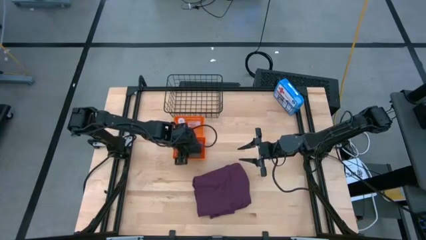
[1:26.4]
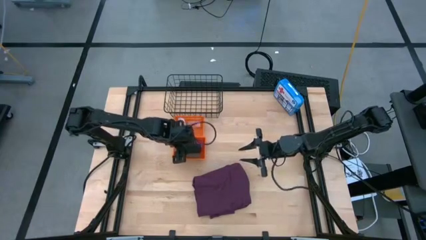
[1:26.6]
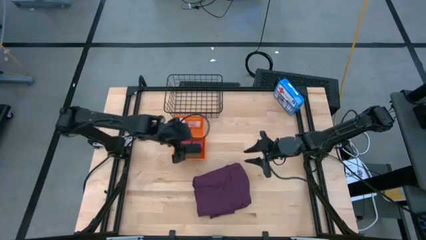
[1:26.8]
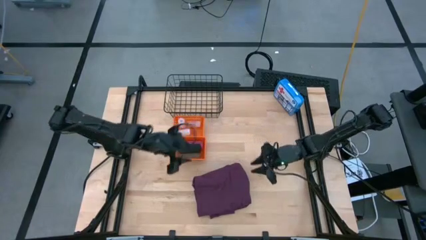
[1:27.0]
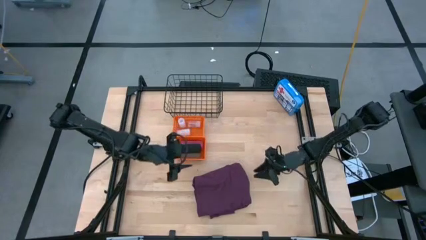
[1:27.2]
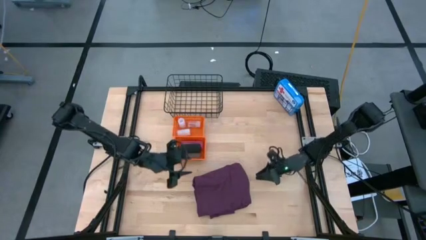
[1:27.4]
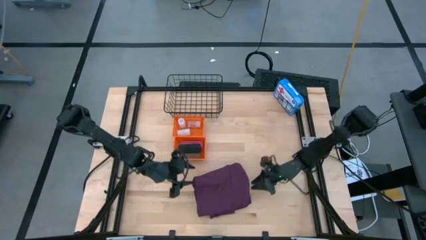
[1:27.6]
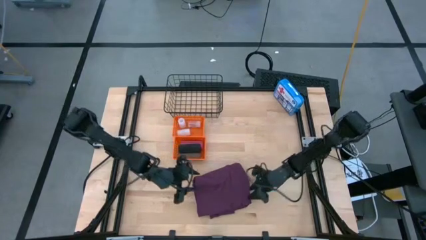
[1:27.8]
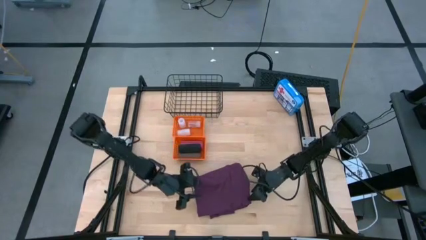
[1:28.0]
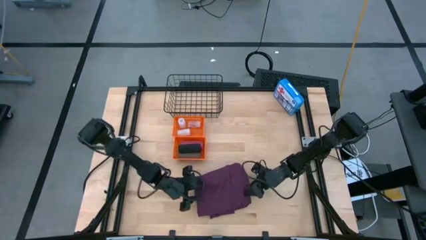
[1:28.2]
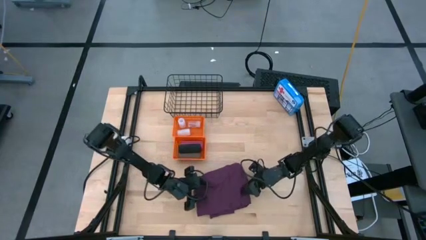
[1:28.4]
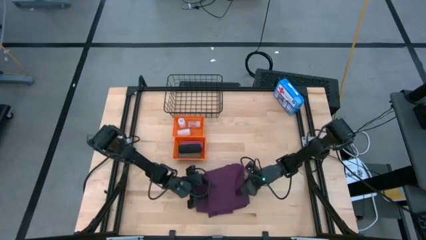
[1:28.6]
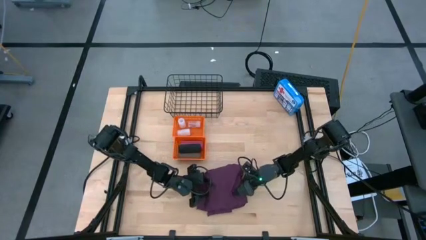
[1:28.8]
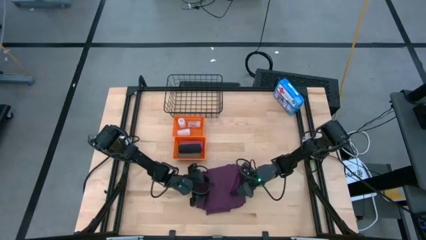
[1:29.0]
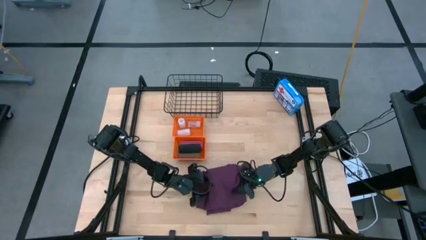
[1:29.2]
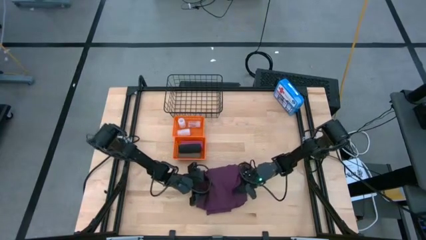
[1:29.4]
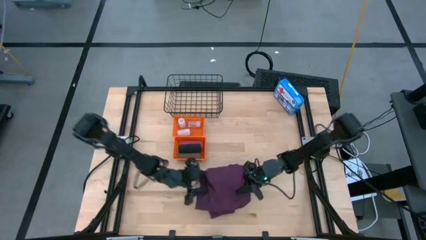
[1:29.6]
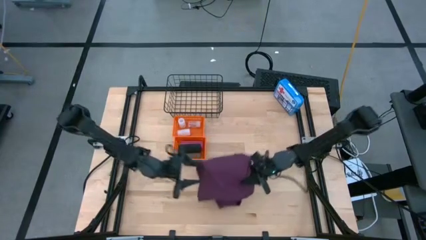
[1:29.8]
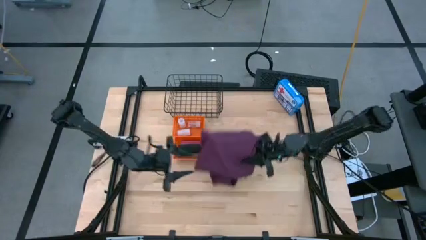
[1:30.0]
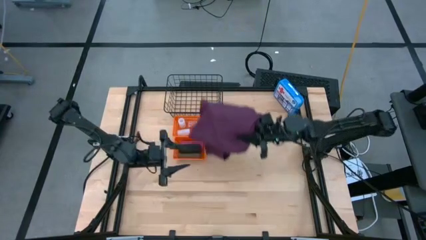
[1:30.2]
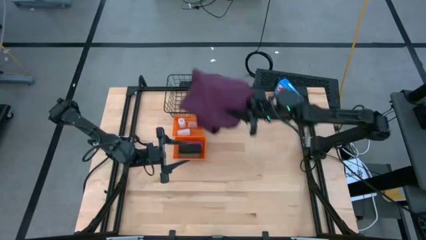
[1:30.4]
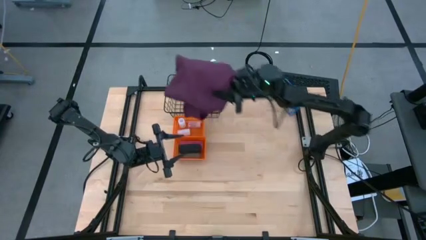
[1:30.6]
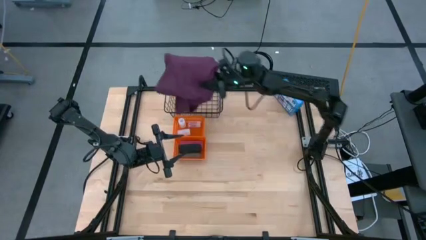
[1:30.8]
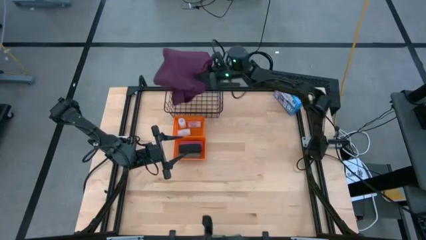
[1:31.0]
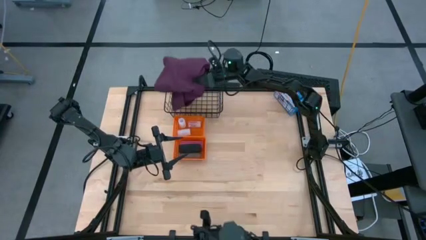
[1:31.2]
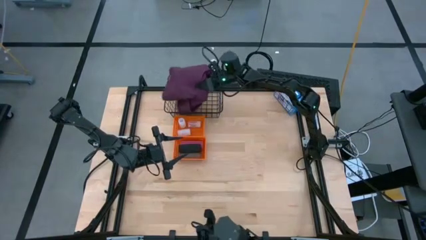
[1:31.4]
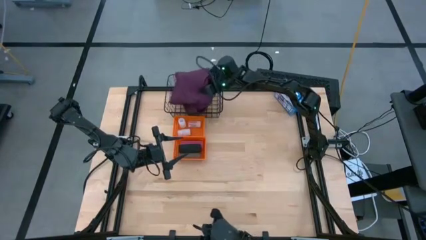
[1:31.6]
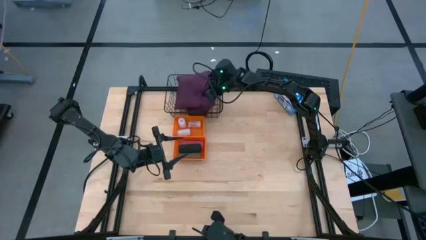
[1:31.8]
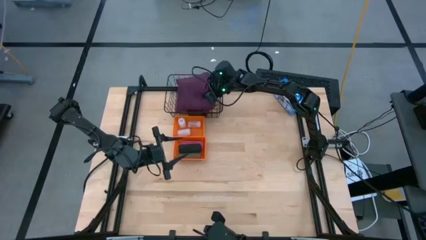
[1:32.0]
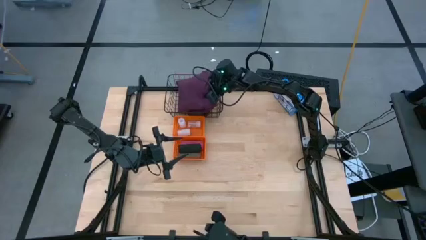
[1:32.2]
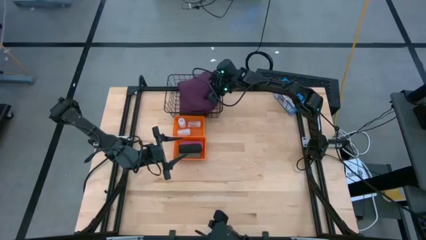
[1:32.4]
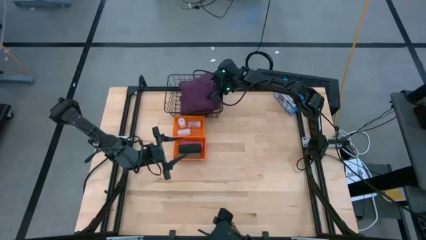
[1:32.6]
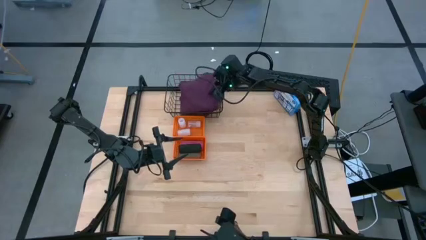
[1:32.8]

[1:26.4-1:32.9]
Task: Pick & place medical supplies in basket/bin
Put the patient gown into the black wire basket

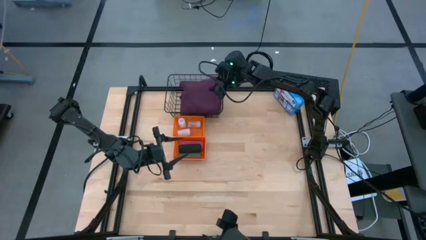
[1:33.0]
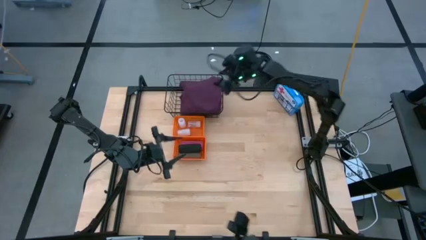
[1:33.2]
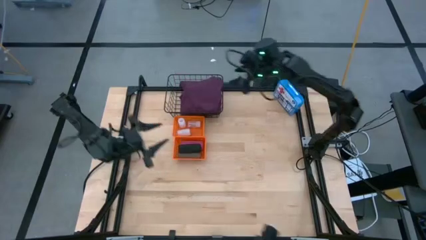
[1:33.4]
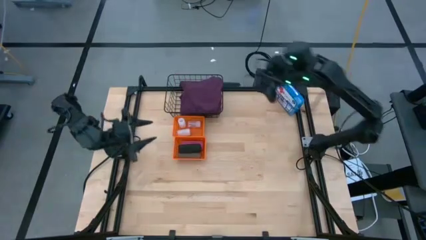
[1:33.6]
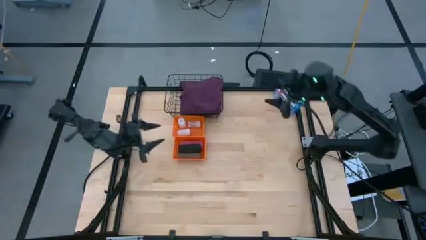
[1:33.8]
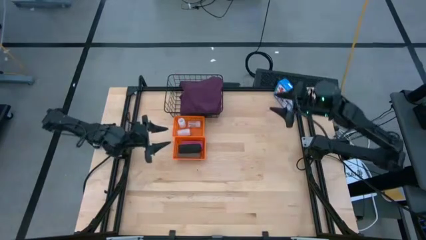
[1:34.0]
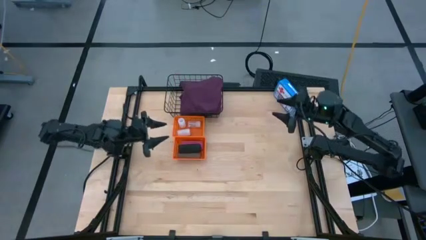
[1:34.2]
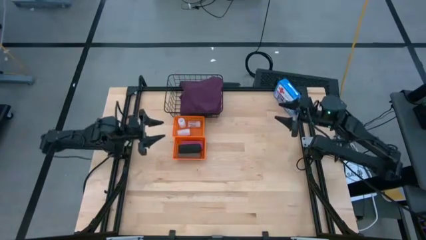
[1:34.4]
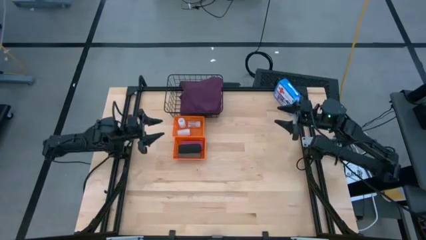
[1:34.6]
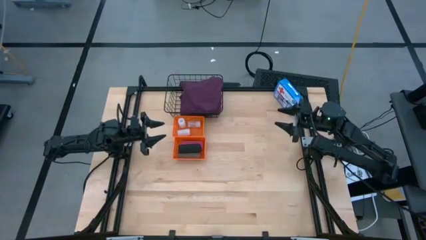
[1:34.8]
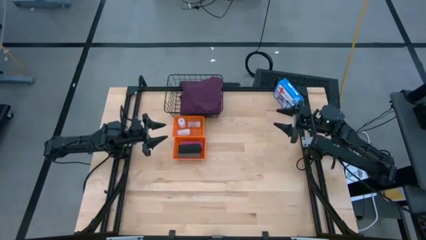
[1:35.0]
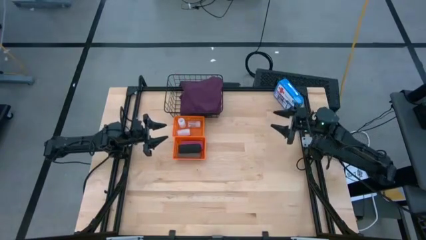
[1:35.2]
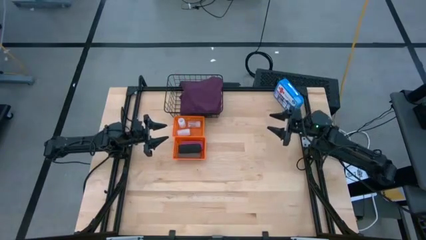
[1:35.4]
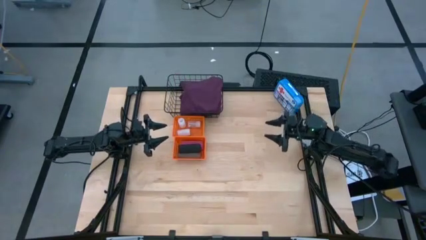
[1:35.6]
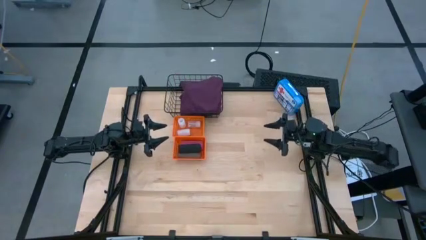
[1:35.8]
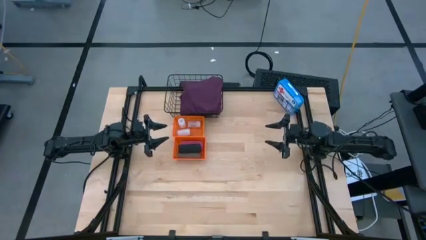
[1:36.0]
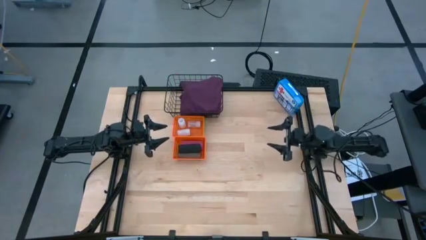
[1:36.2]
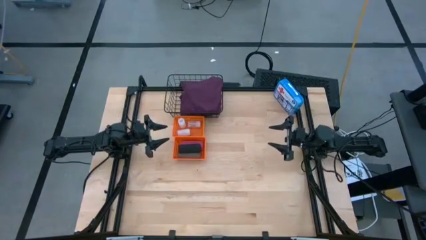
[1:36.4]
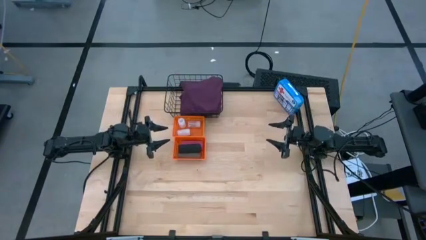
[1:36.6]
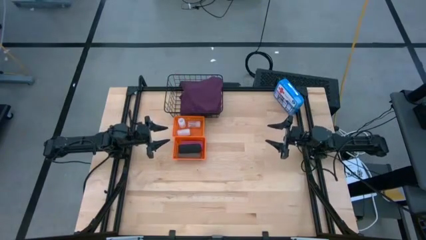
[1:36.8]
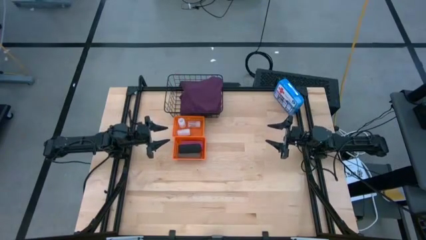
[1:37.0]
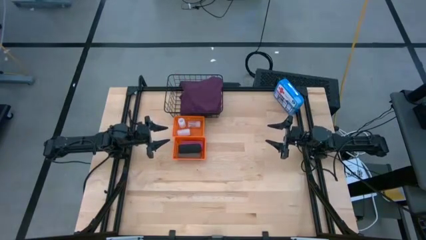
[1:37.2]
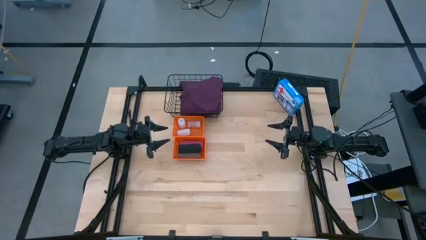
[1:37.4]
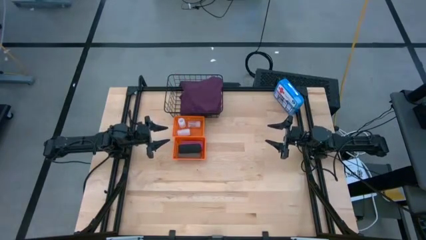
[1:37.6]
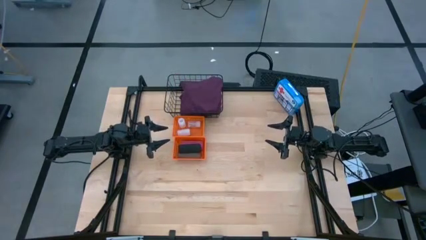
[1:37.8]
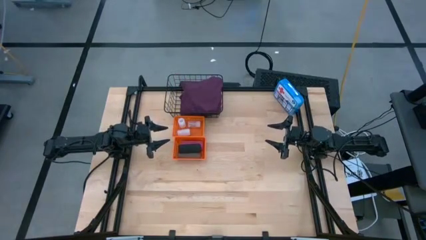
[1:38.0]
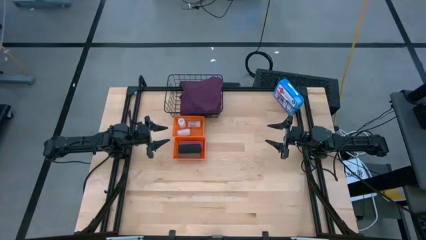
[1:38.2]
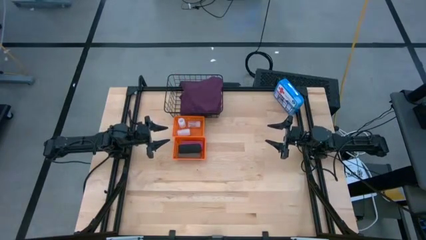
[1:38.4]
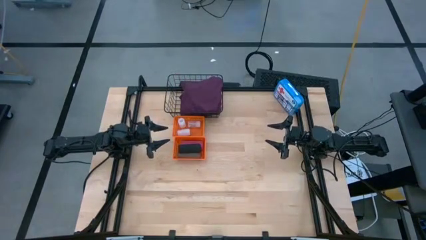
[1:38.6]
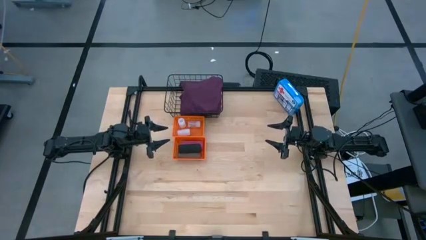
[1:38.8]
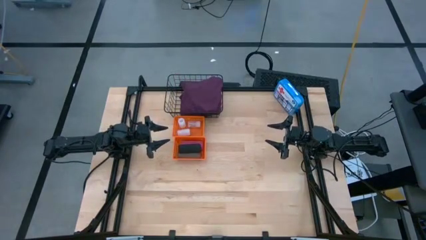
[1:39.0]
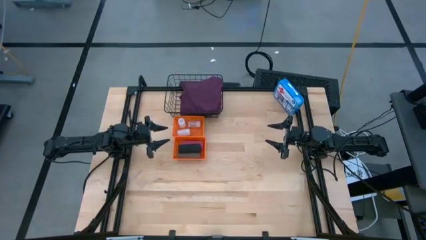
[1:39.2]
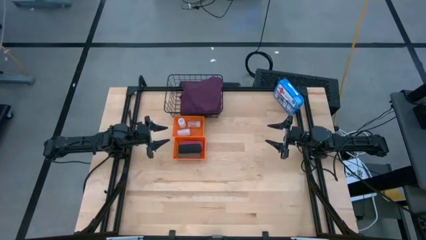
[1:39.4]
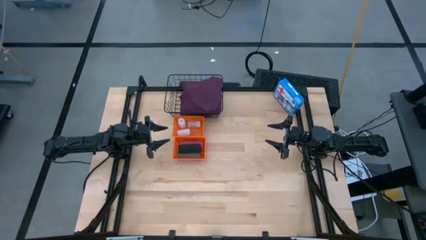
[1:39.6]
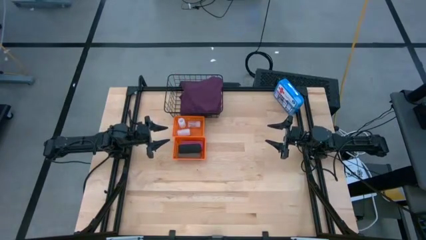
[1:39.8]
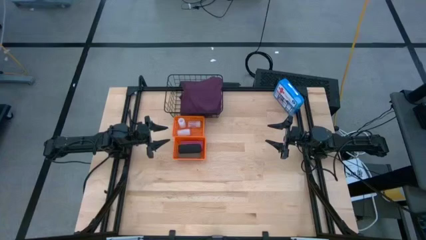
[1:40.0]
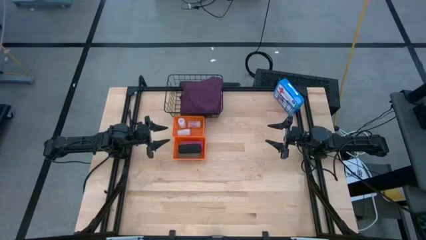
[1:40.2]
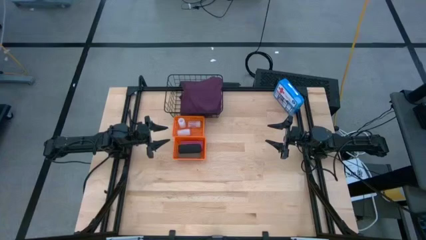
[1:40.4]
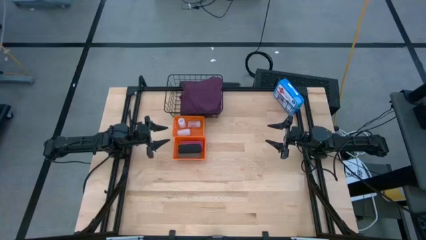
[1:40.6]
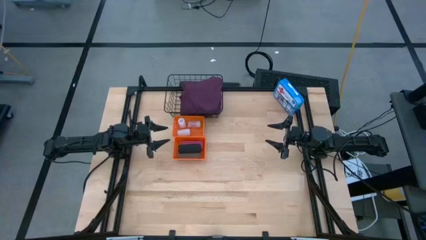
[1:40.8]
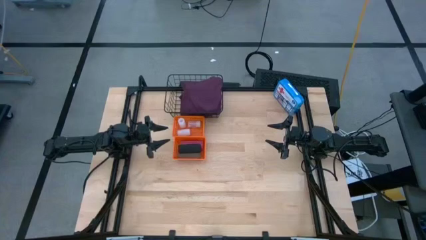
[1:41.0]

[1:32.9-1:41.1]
Return to Home Position
